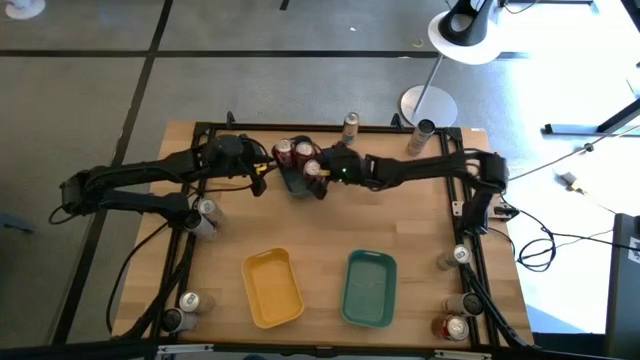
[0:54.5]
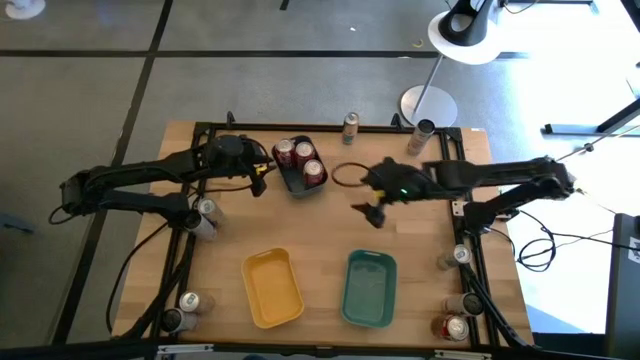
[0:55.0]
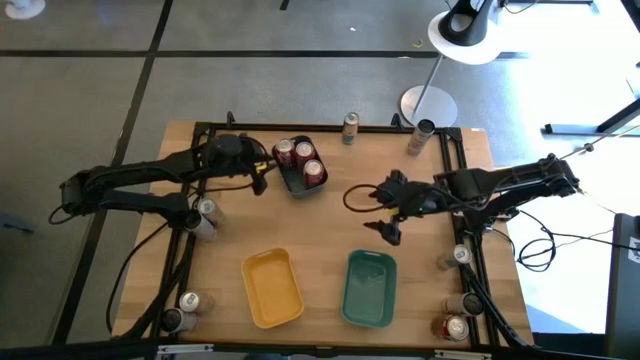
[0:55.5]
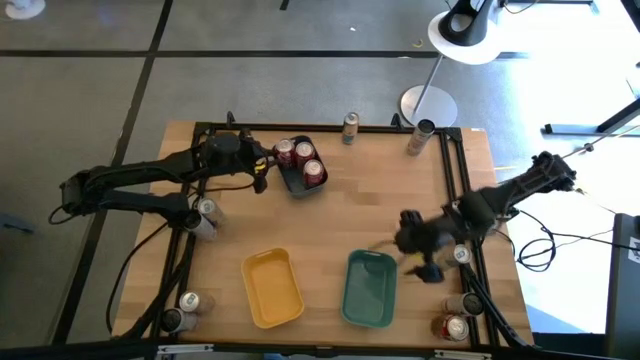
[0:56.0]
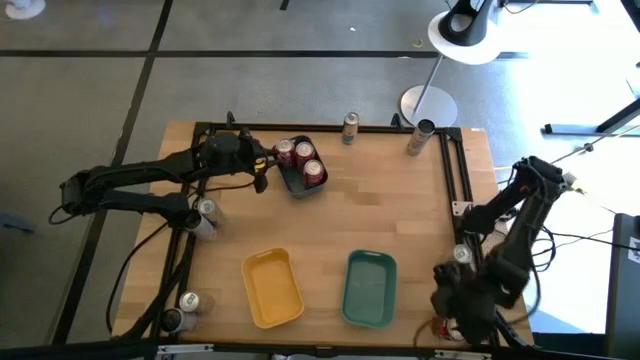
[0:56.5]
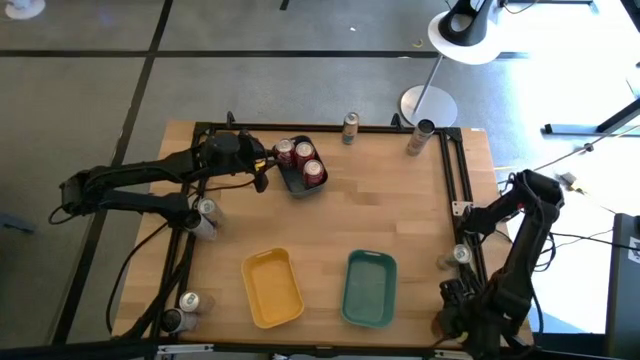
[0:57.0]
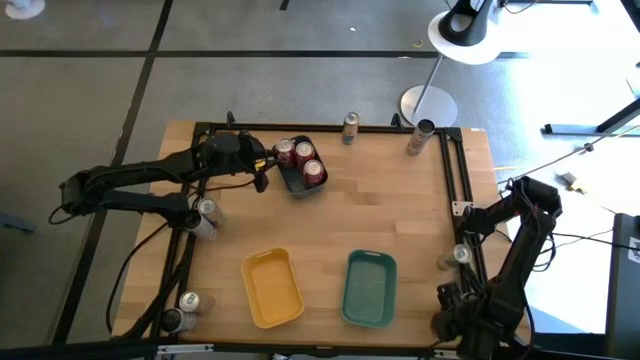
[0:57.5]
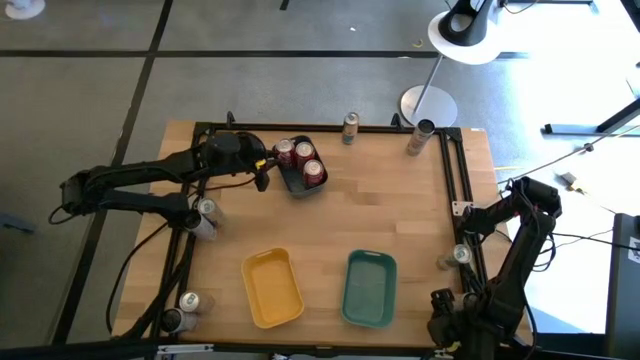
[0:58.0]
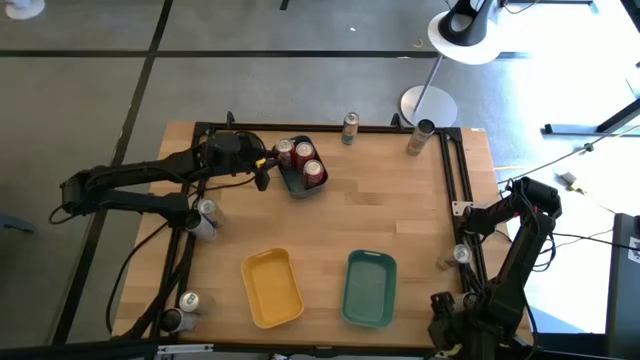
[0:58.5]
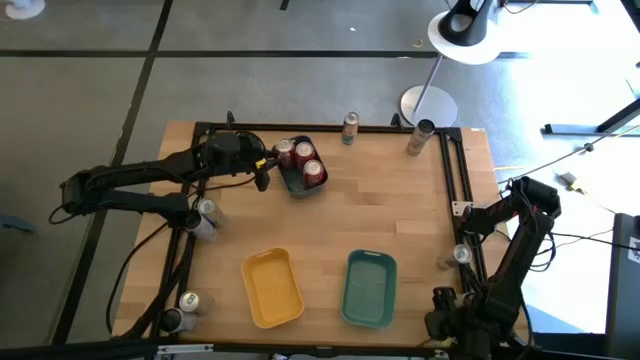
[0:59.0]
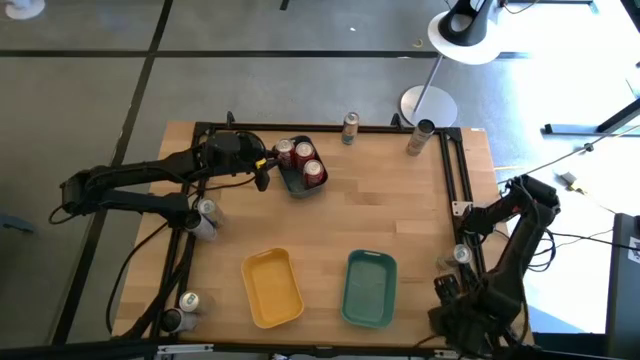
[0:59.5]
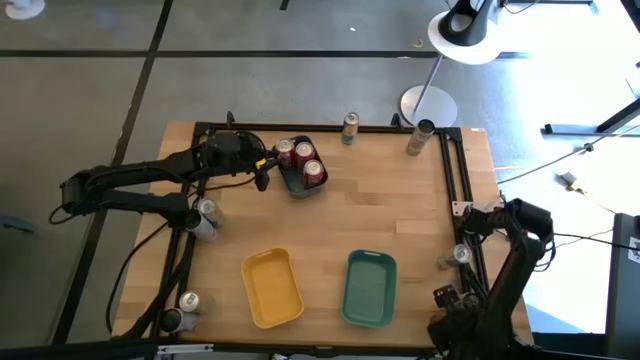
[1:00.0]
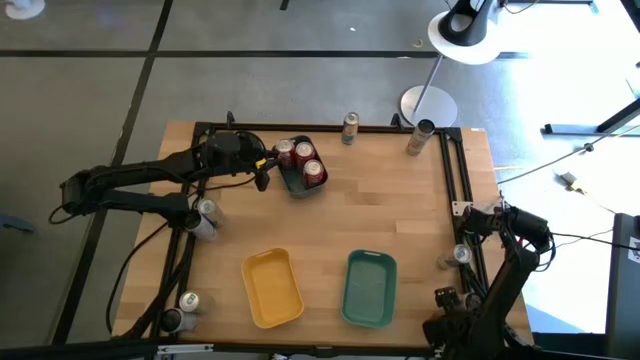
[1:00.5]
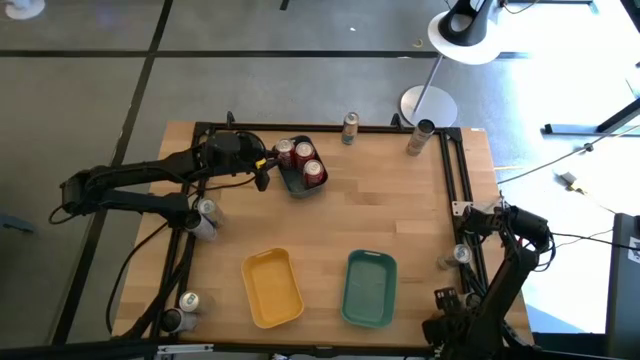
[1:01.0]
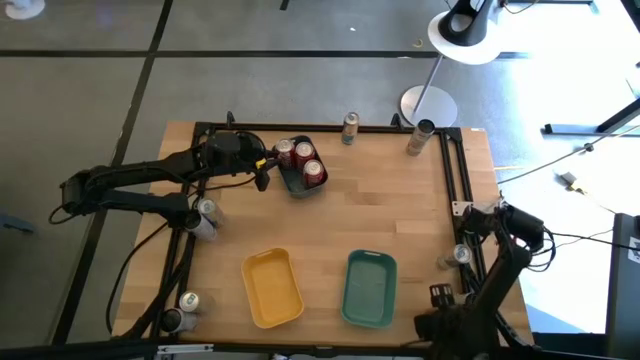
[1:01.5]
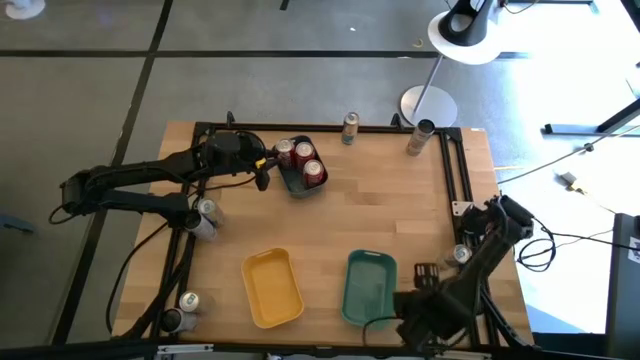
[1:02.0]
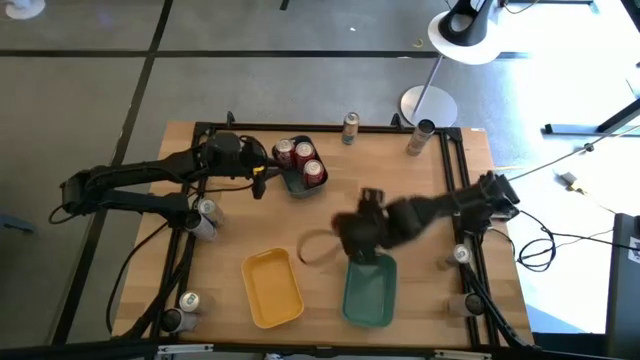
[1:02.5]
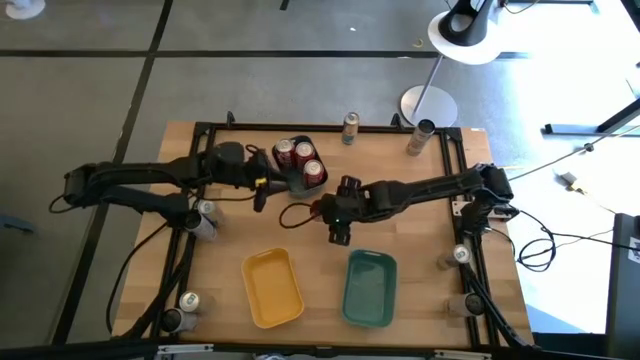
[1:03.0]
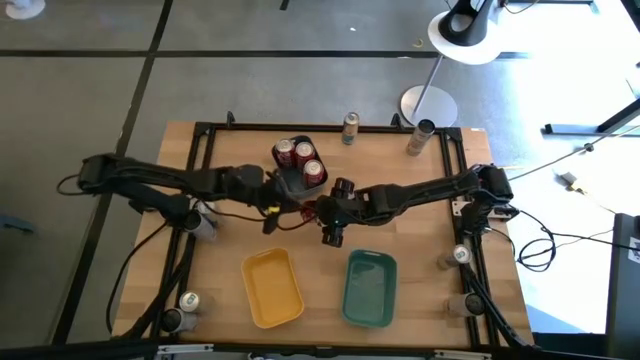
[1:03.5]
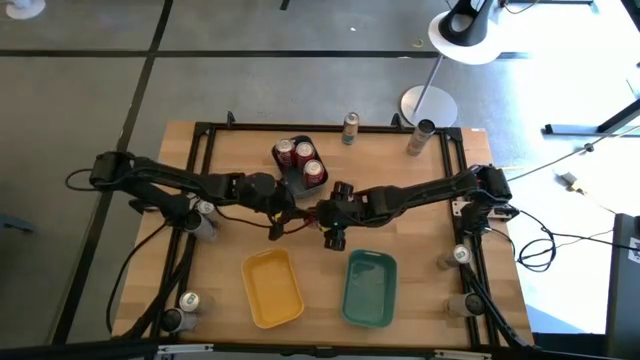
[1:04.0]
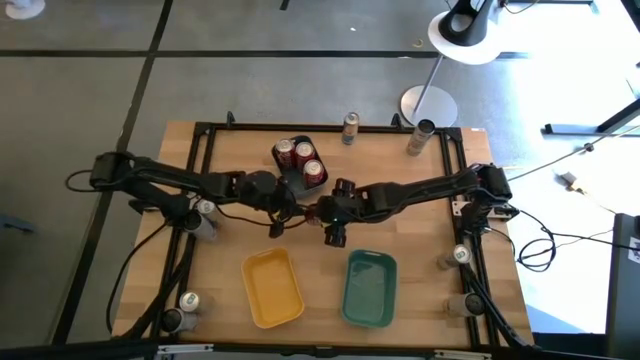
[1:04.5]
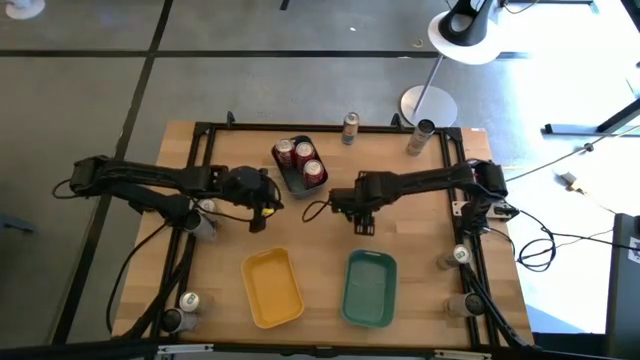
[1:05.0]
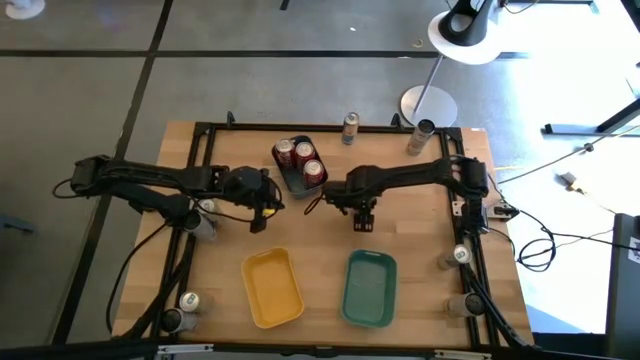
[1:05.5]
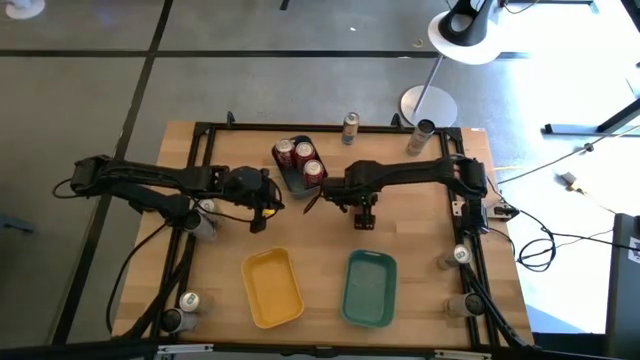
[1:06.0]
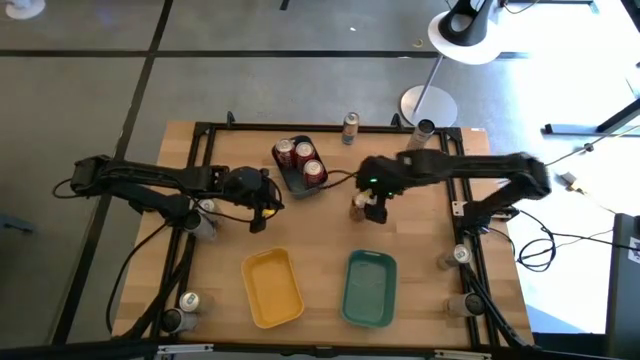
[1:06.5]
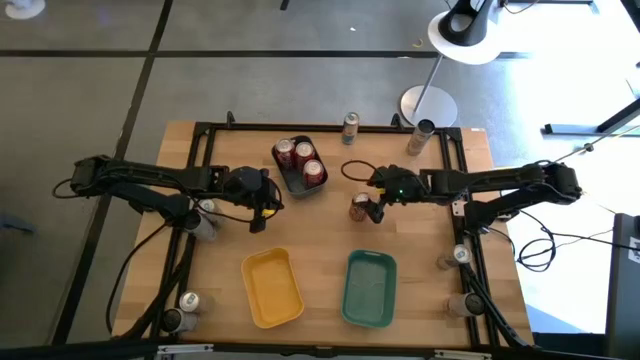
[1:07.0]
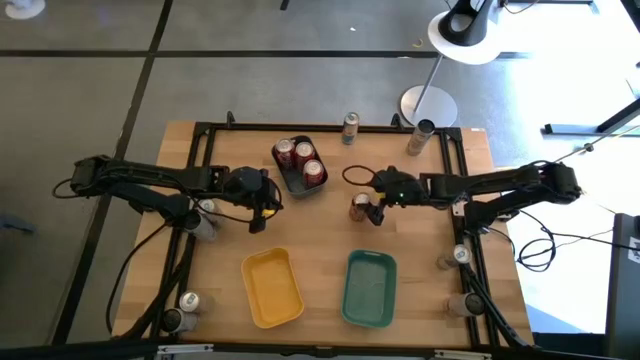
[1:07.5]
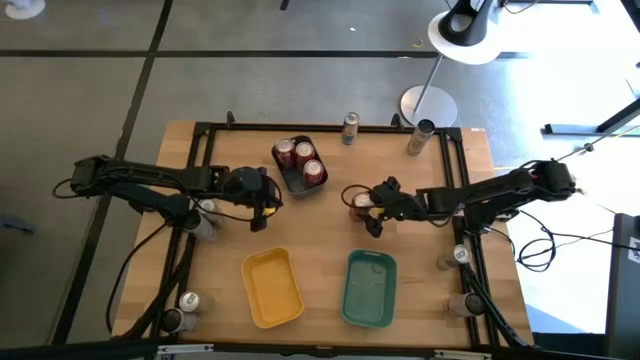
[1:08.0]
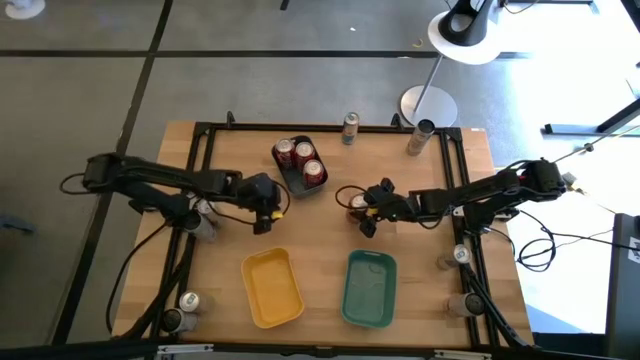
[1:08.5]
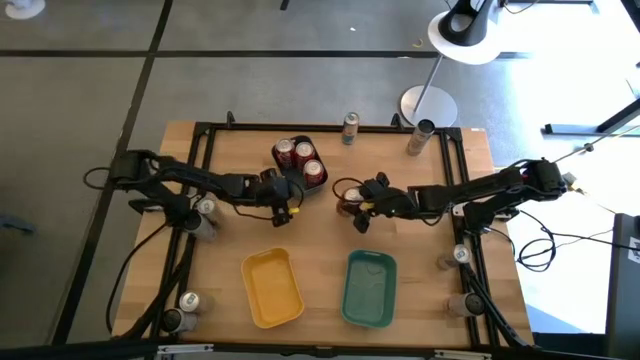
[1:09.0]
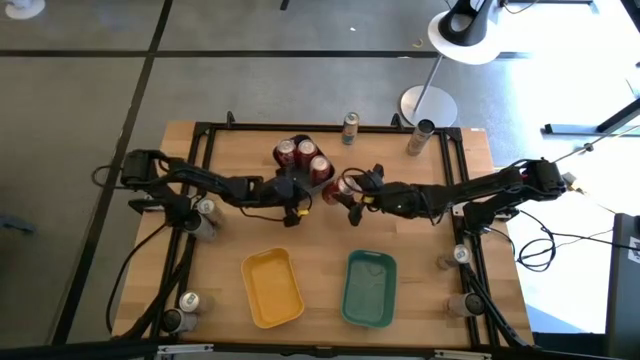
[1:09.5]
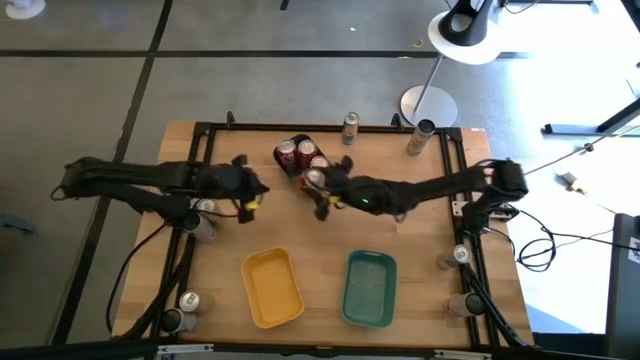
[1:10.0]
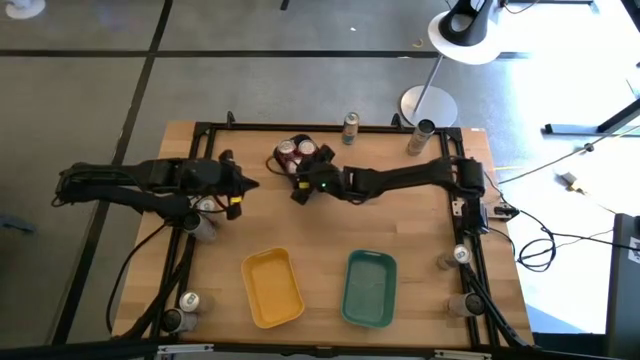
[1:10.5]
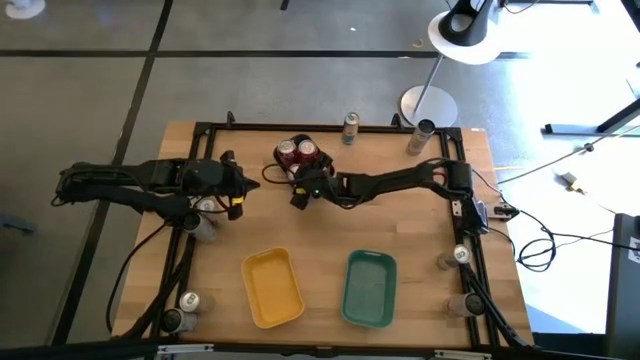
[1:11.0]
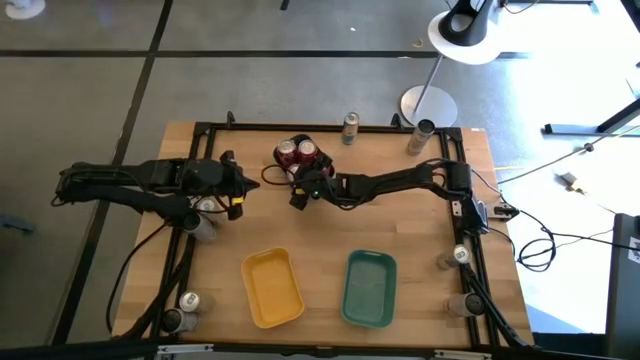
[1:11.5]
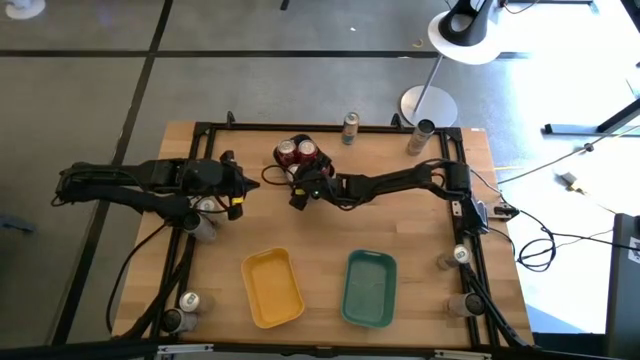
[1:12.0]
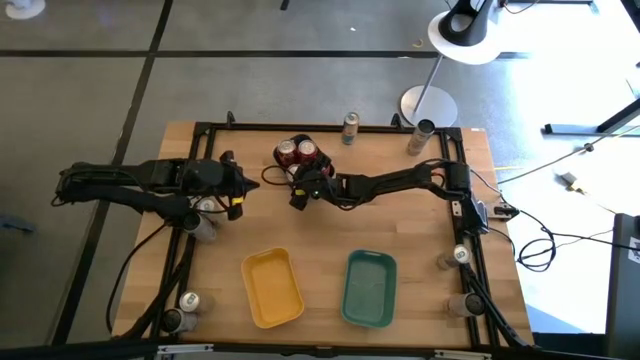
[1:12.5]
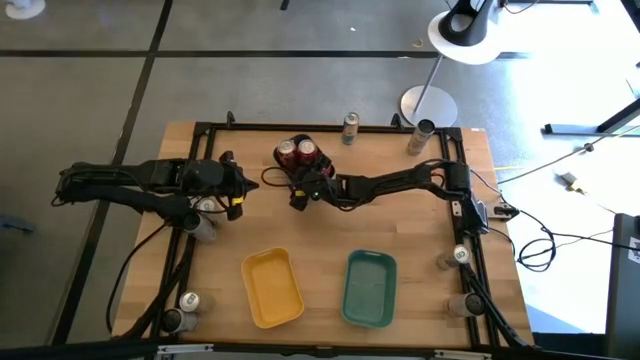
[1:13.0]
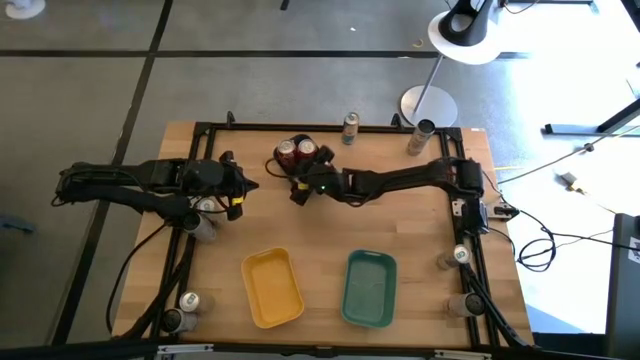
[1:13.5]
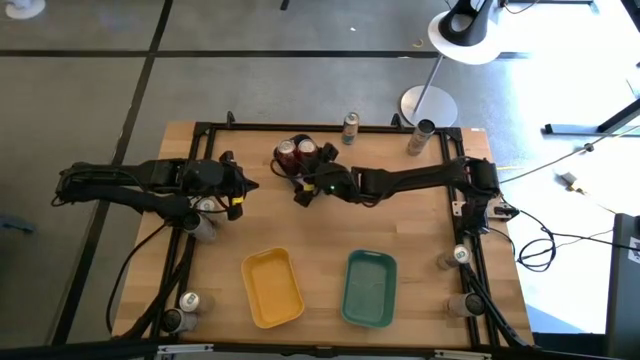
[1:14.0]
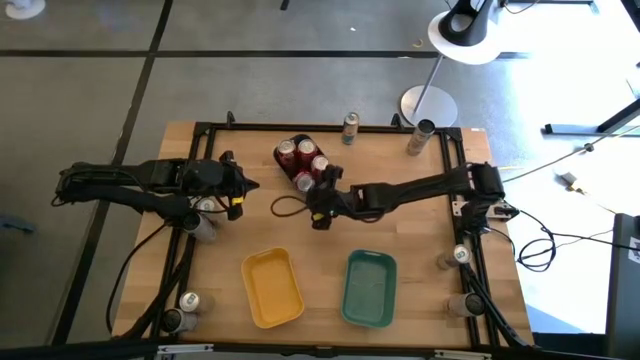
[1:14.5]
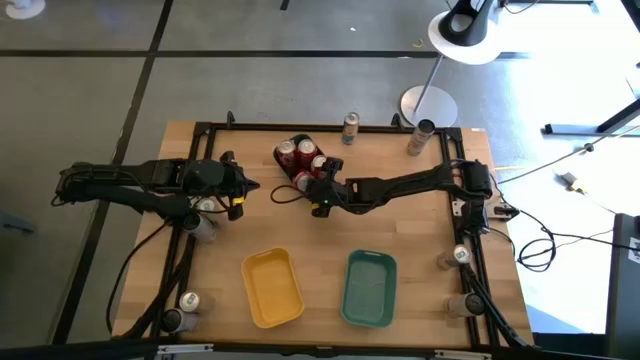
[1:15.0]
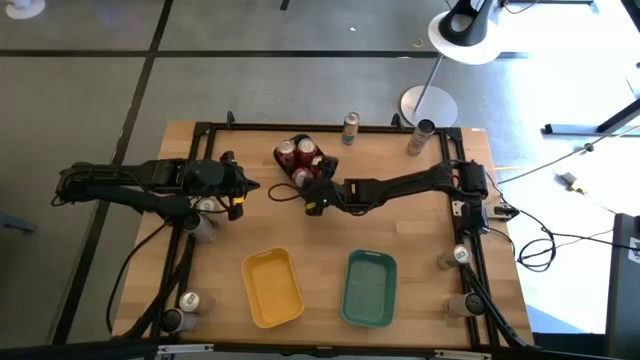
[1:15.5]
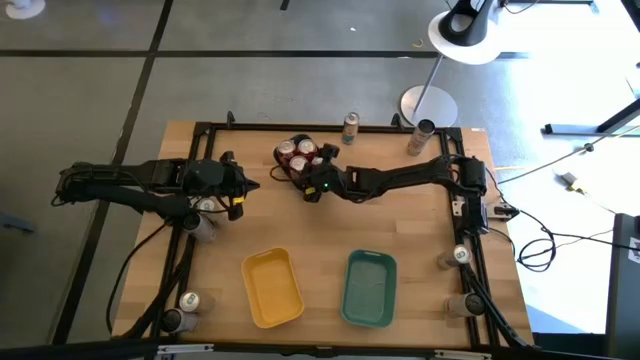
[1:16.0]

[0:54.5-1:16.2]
Task: Sort soda cans
Put the red and white soda can into the blue bin
